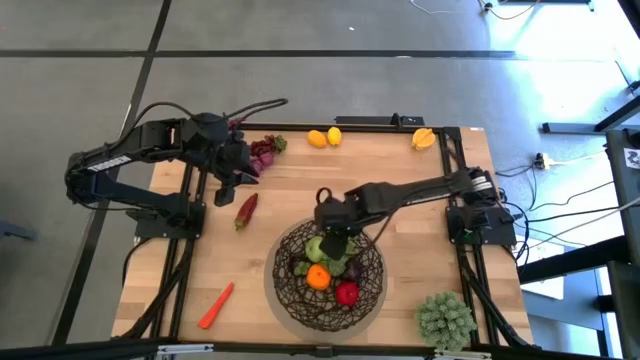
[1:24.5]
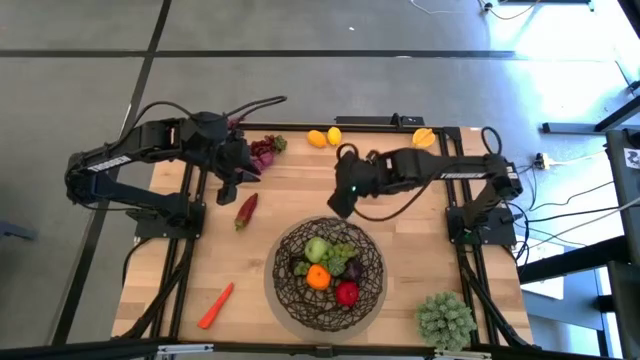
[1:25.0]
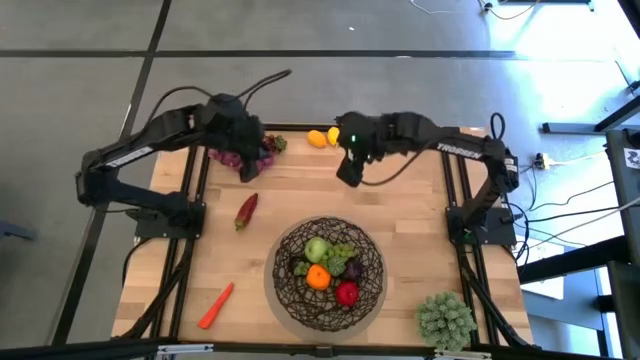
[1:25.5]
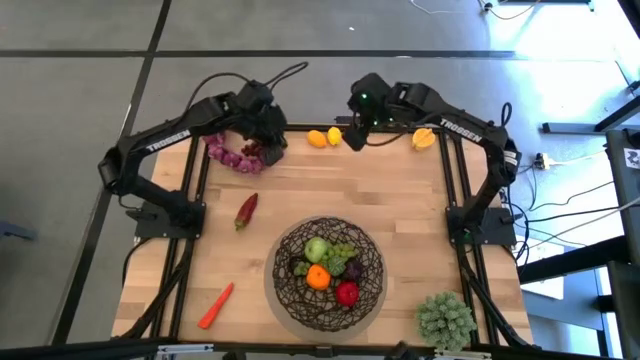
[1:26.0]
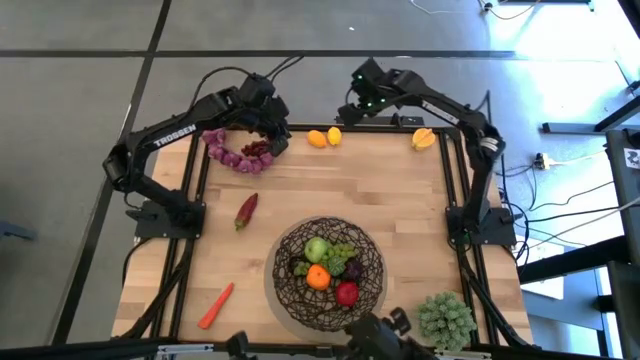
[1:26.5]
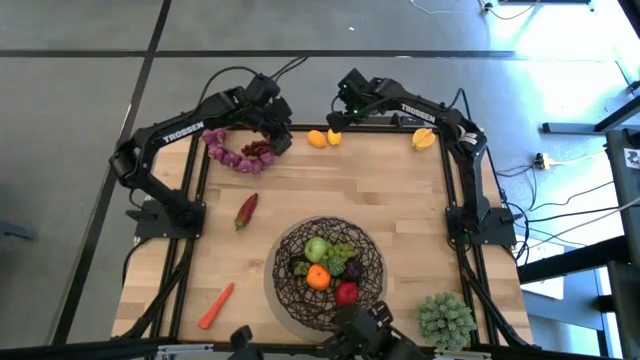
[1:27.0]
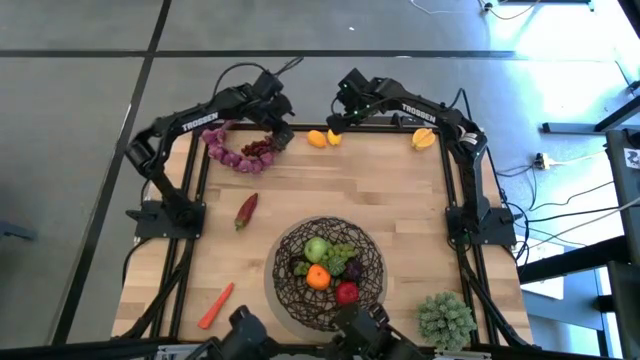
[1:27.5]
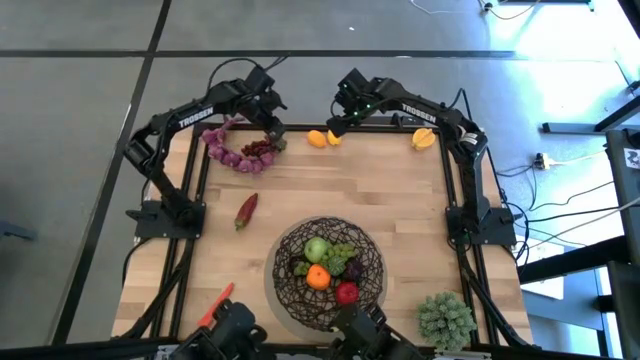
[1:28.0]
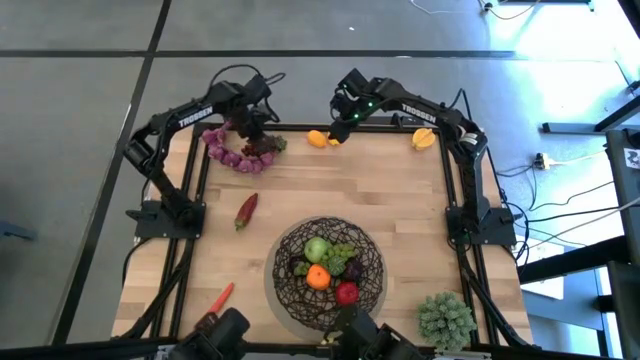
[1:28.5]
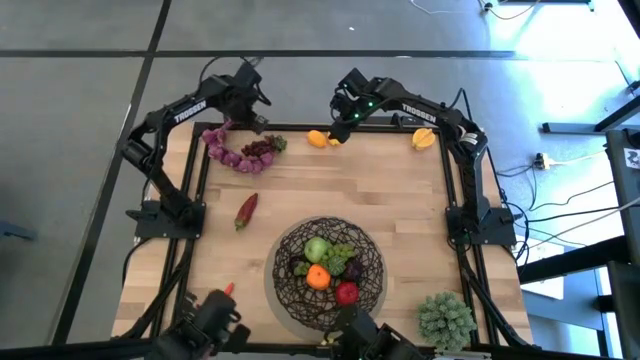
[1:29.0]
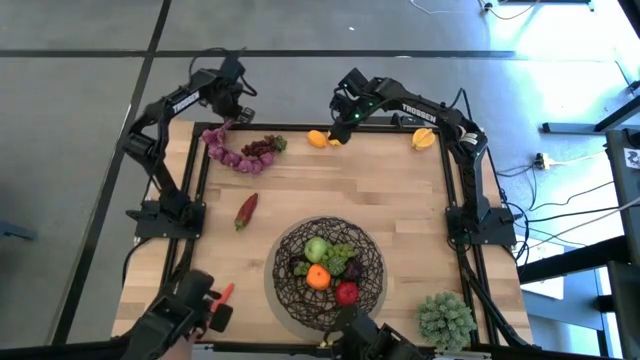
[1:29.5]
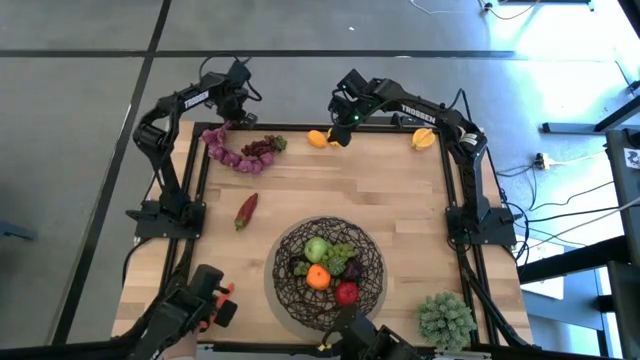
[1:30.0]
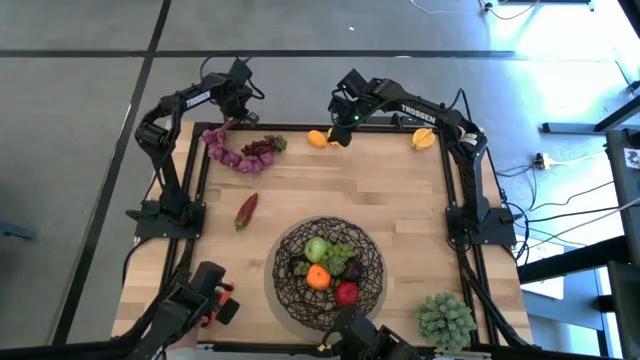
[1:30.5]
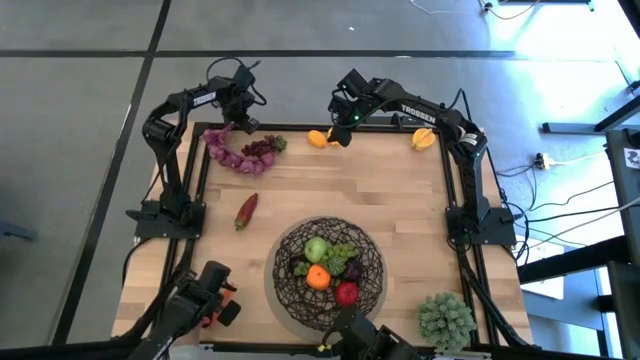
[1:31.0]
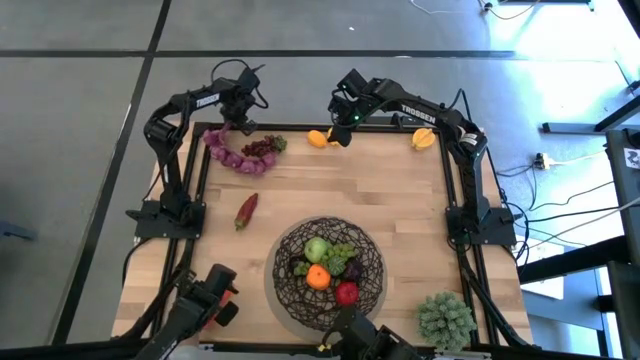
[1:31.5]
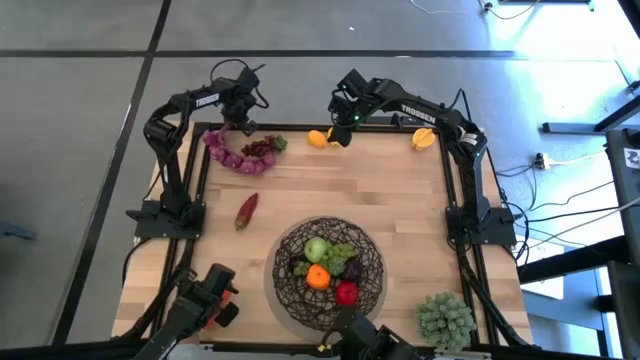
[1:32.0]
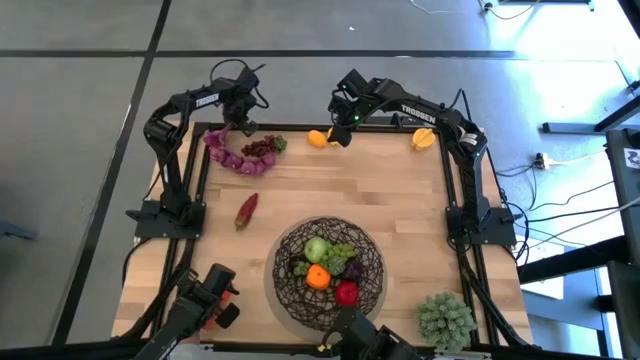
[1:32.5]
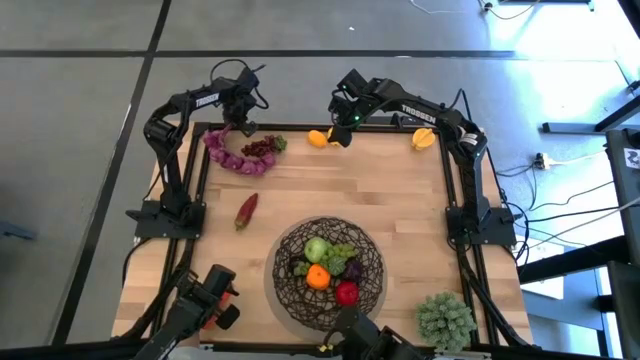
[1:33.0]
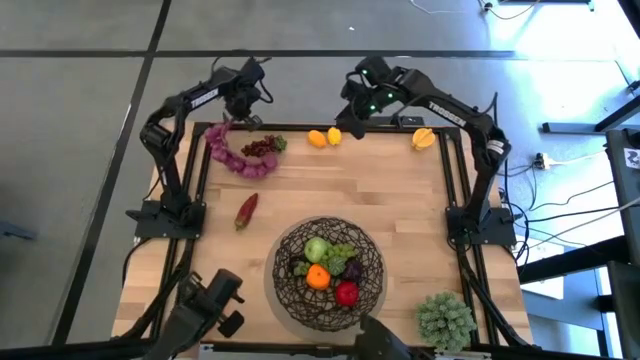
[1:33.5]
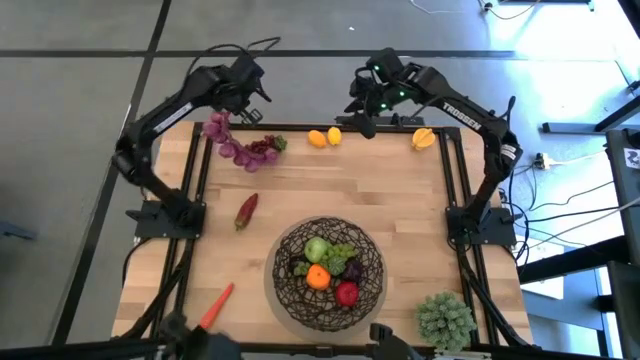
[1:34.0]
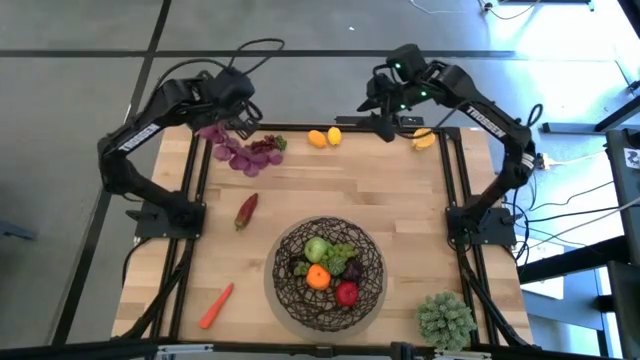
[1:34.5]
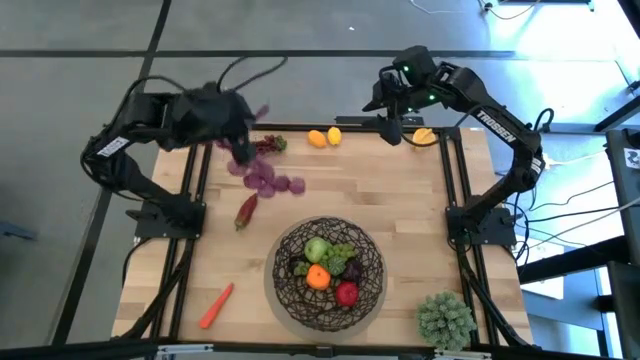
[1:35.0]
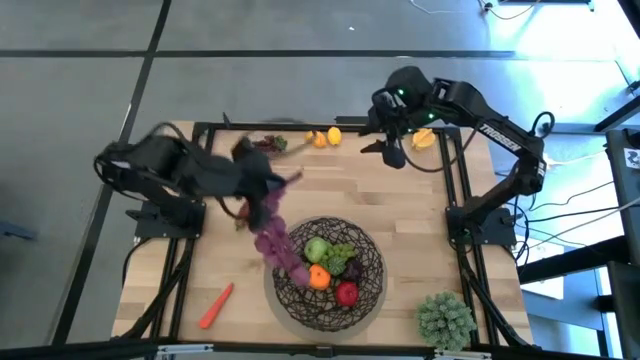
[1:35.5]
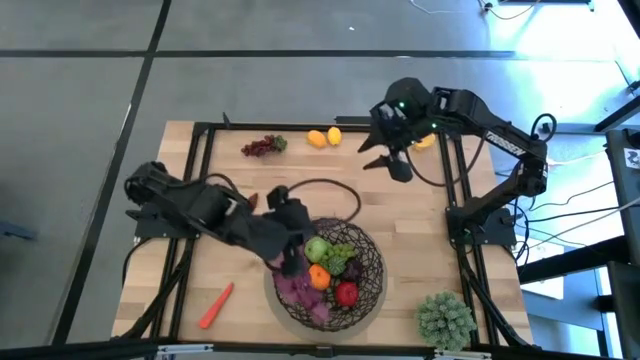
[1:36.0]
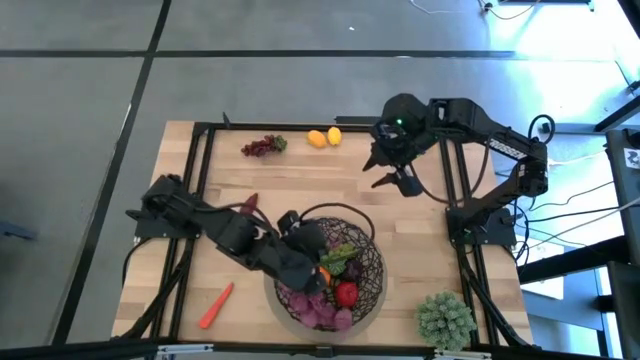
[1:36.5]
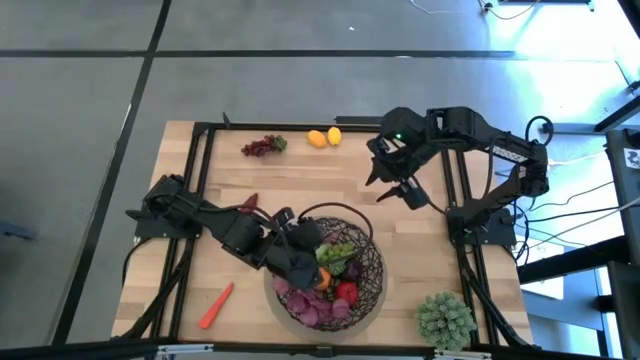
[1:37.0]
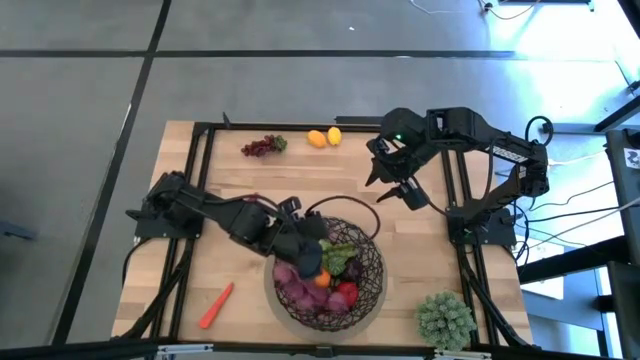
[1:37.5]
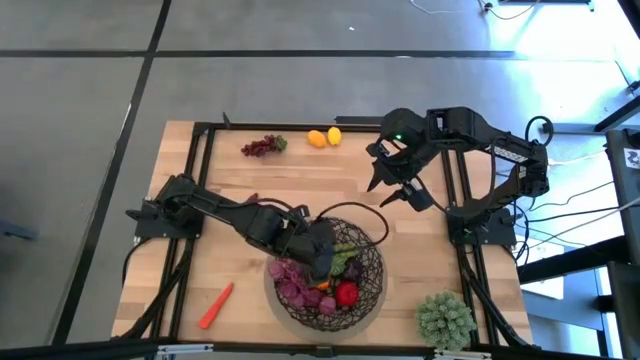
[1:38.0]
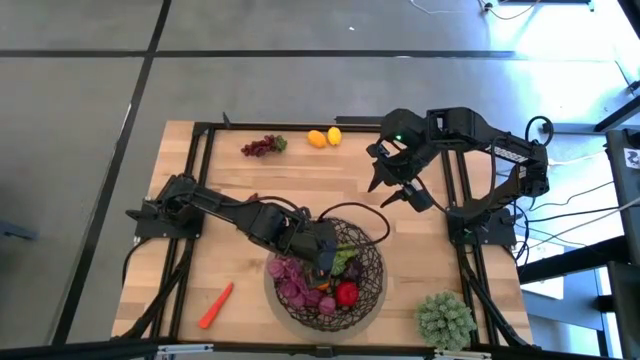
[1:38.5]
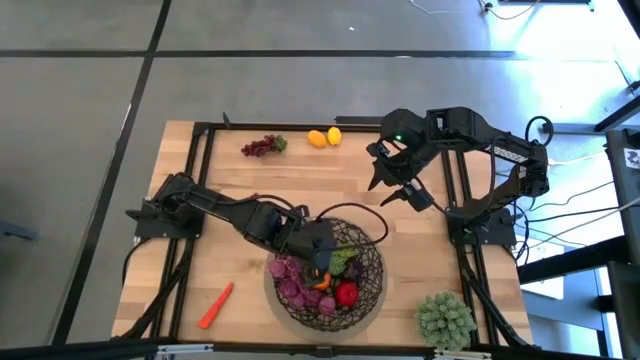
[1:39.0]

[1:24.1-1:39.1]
Task: Build produce basket
Put the purple garlic into the mesh basket

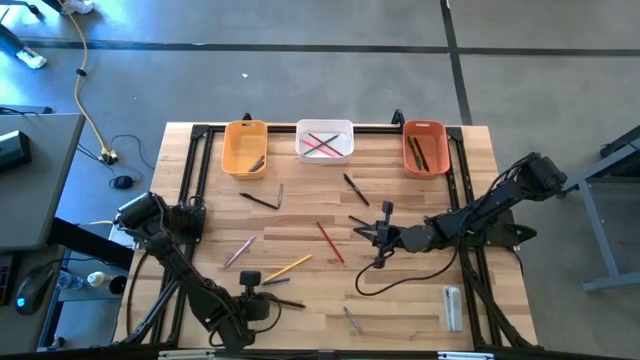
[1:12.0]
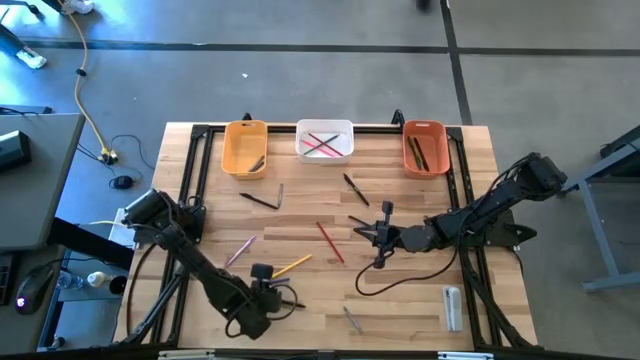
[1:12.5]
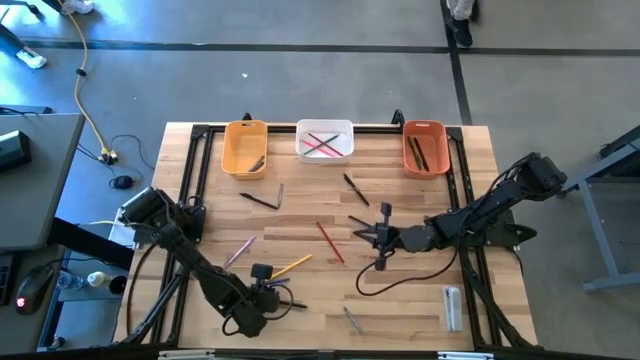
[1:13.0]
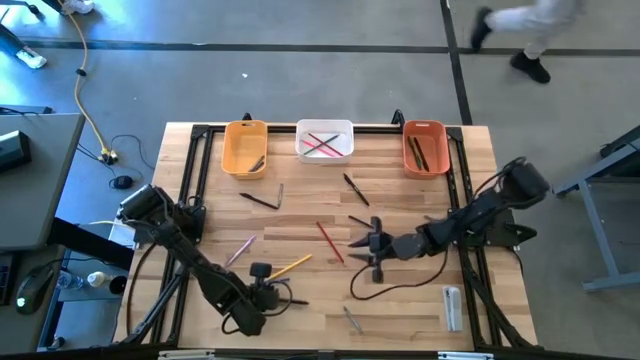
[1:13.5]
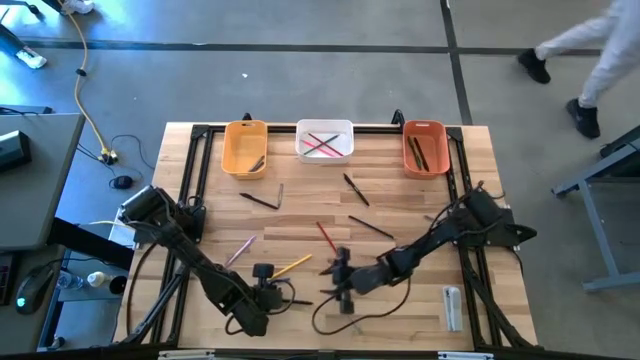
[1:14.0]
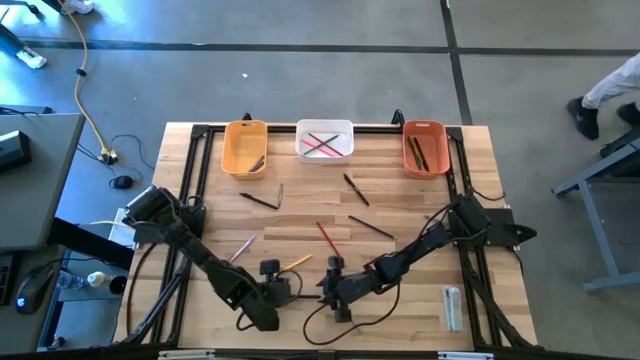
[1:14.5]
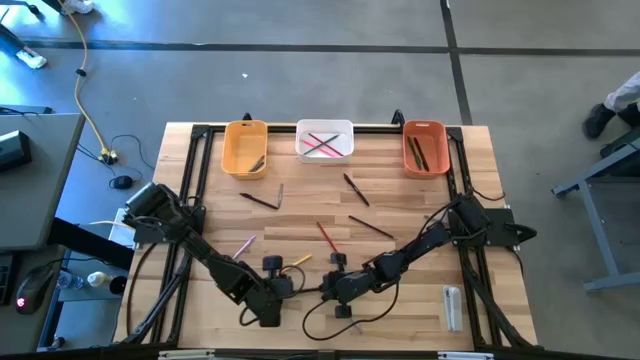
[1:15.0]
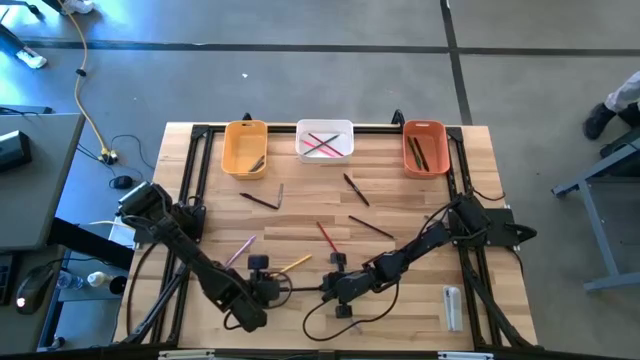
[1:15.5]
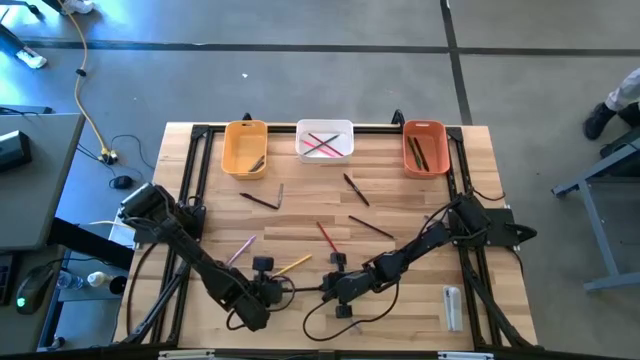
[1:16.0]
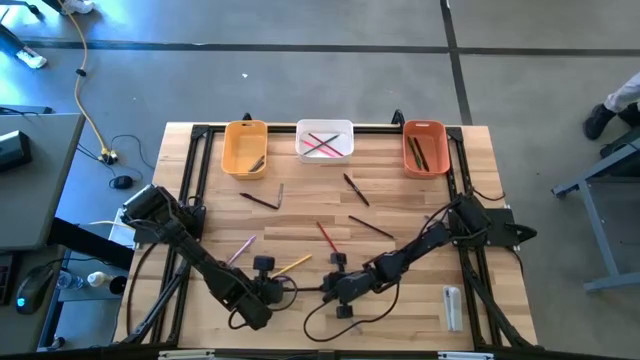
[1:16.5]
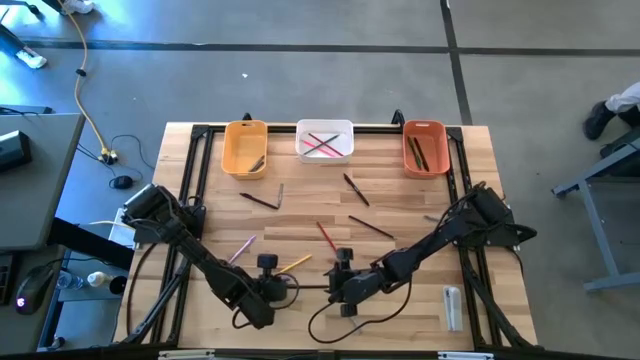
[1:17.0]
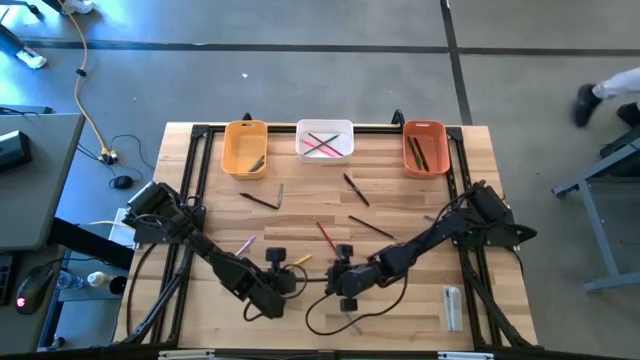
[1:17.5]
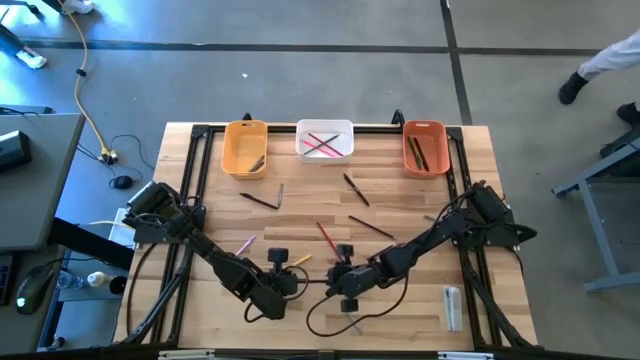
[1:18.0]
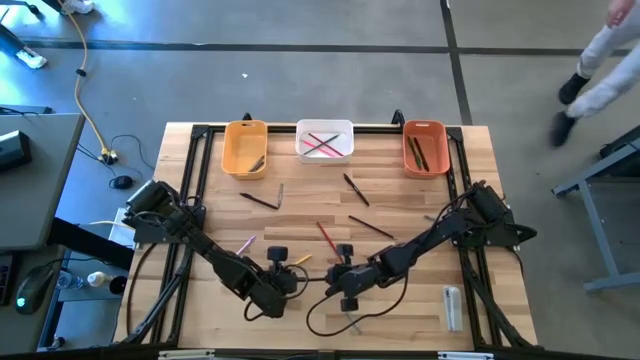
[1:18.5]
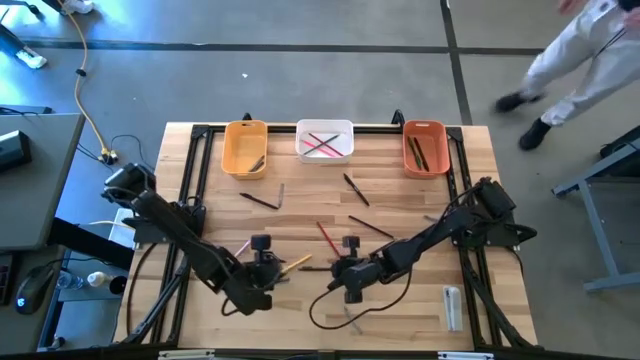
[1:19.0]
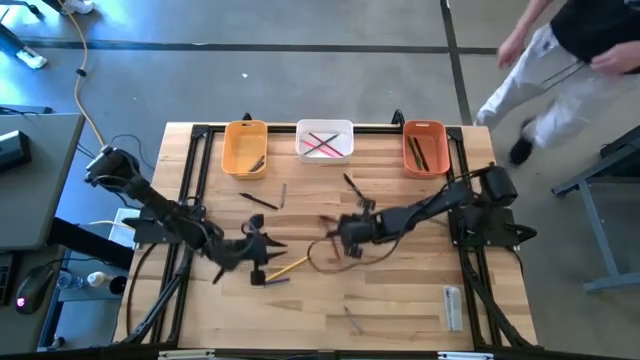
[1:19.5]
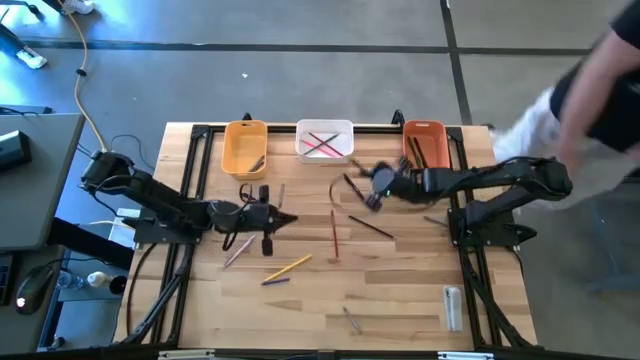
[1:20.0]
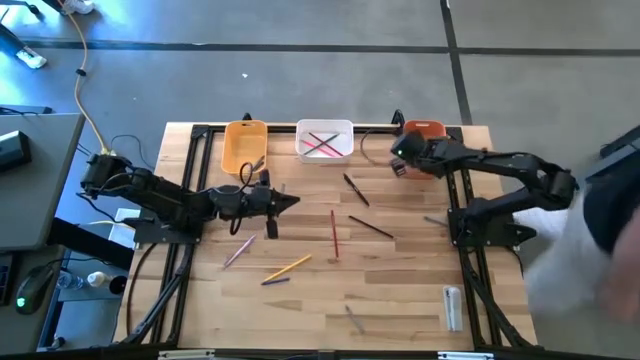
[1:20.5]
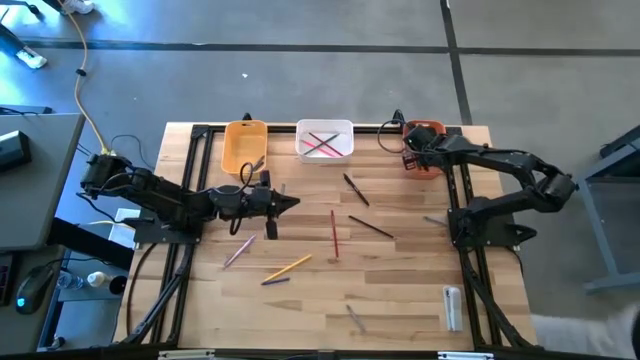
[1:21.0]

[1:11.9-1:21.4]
Task: Sort crayons/erasers/pens/pencils in bins
Put the black pen into the orange bin
